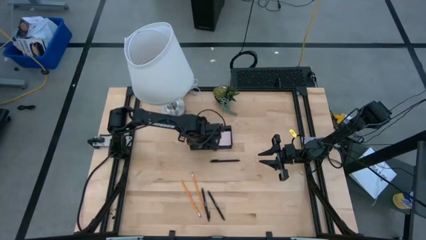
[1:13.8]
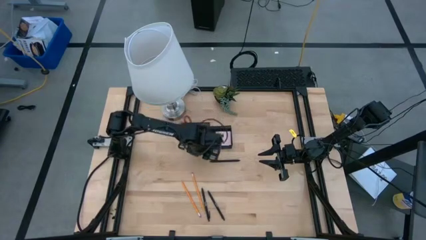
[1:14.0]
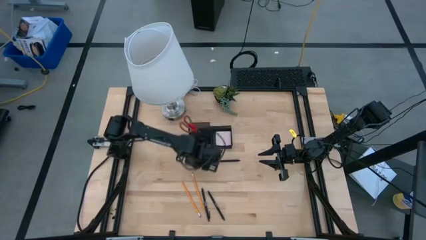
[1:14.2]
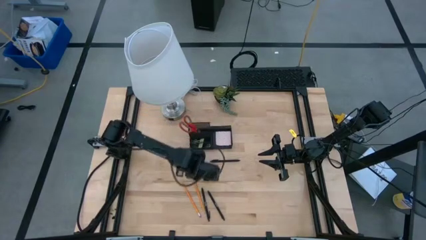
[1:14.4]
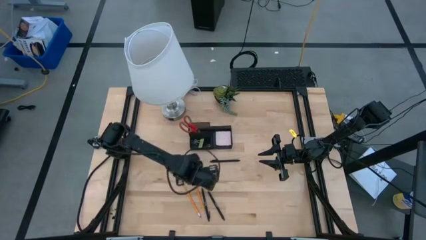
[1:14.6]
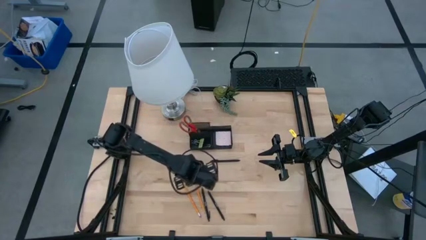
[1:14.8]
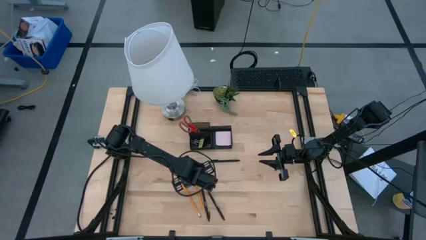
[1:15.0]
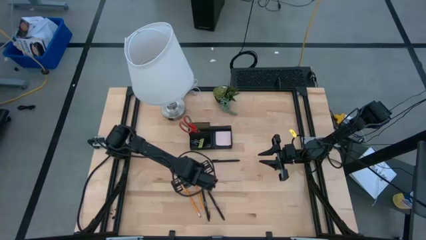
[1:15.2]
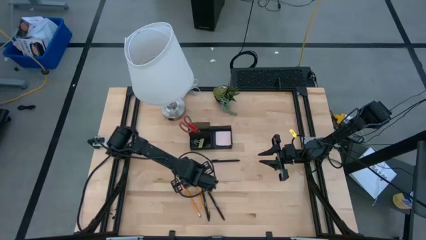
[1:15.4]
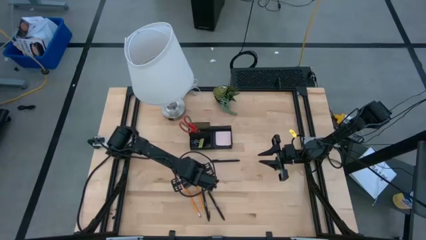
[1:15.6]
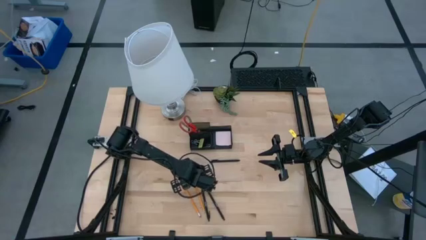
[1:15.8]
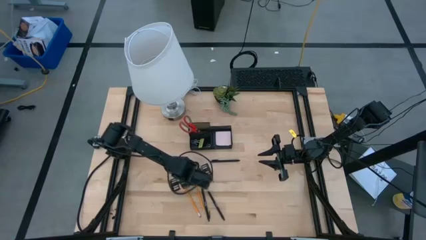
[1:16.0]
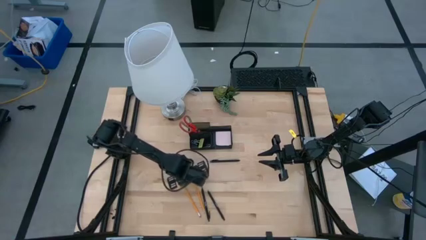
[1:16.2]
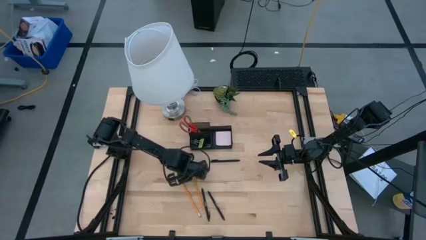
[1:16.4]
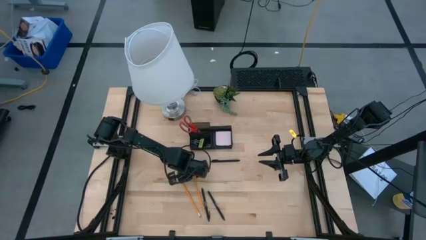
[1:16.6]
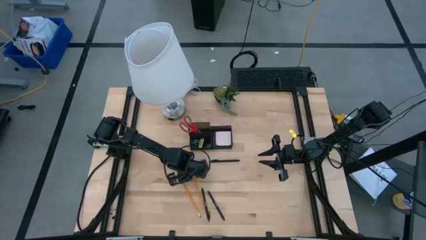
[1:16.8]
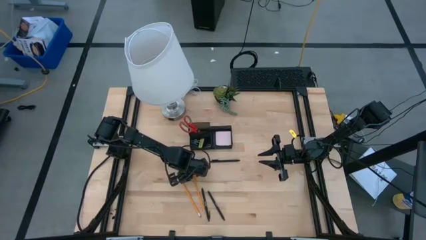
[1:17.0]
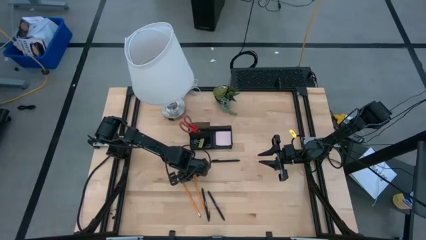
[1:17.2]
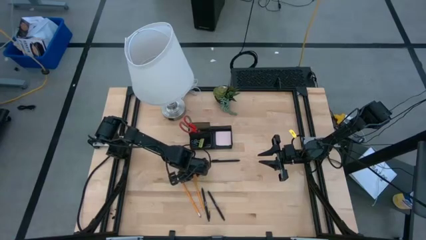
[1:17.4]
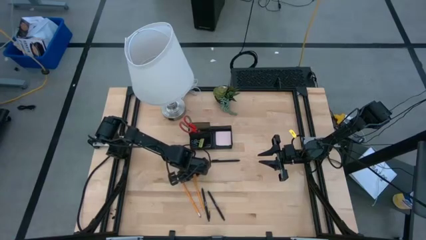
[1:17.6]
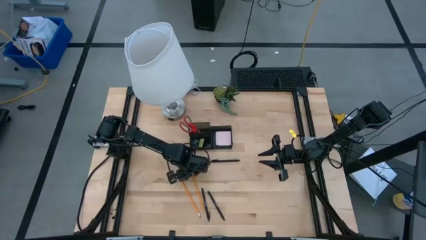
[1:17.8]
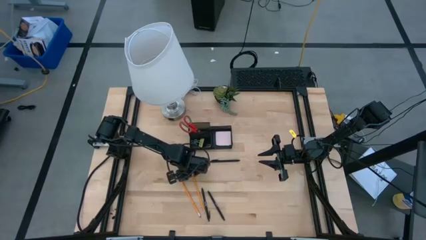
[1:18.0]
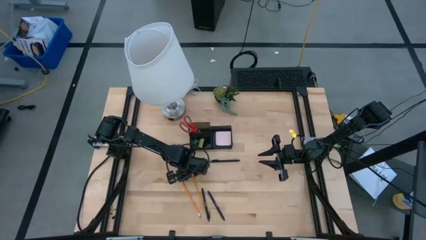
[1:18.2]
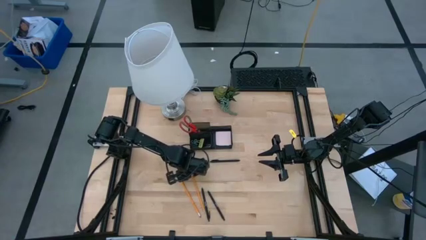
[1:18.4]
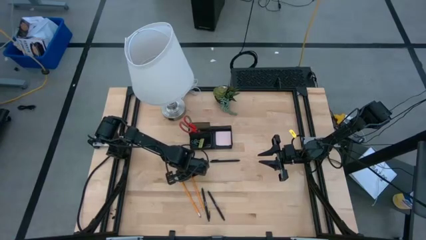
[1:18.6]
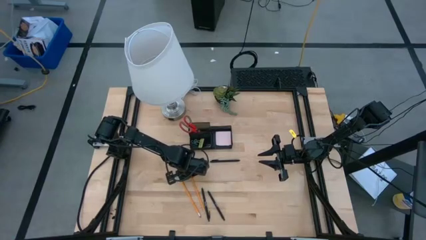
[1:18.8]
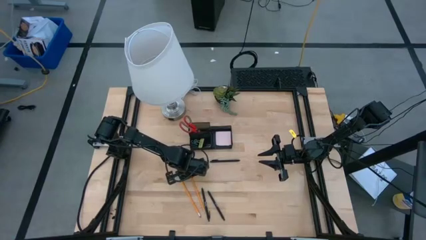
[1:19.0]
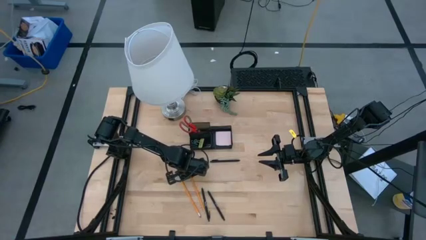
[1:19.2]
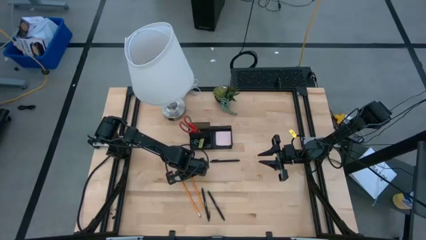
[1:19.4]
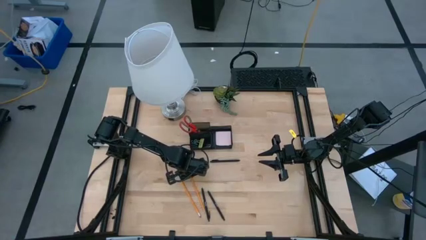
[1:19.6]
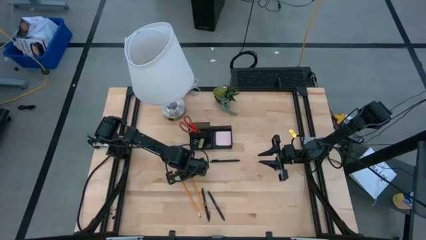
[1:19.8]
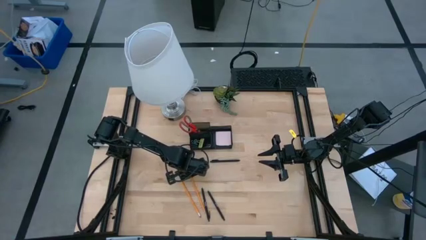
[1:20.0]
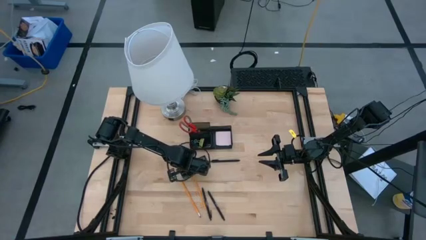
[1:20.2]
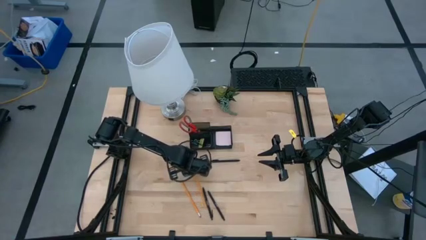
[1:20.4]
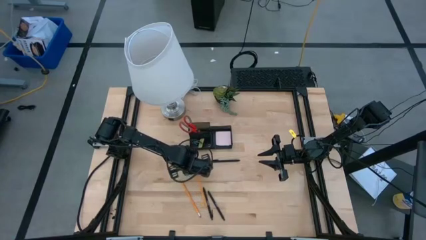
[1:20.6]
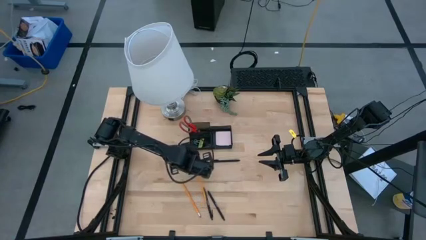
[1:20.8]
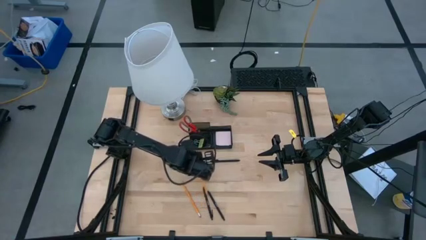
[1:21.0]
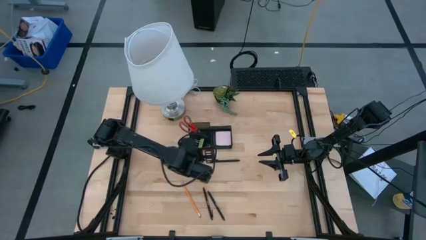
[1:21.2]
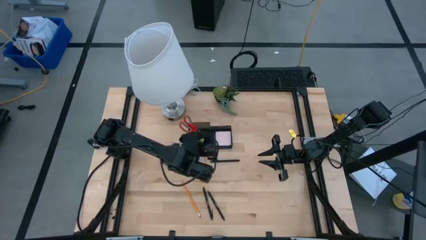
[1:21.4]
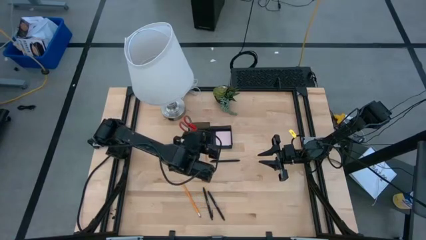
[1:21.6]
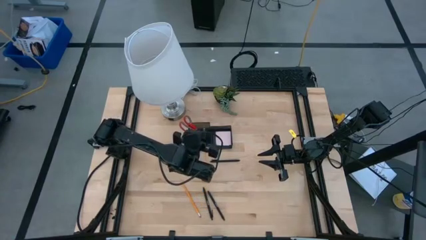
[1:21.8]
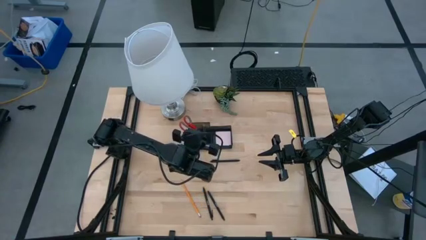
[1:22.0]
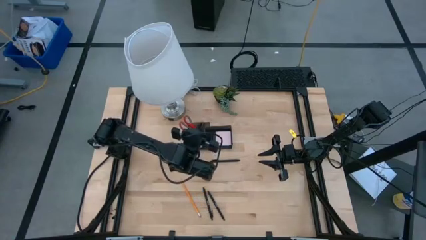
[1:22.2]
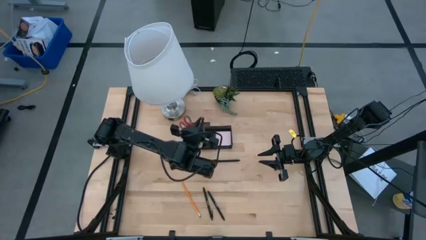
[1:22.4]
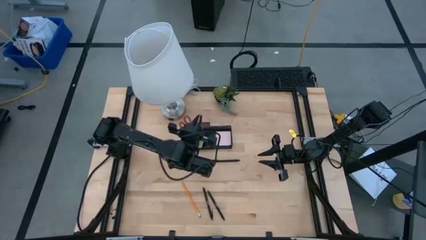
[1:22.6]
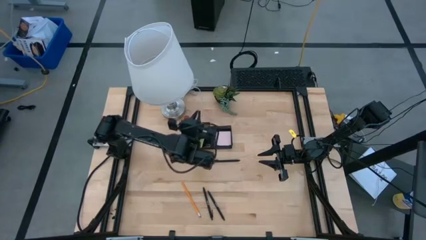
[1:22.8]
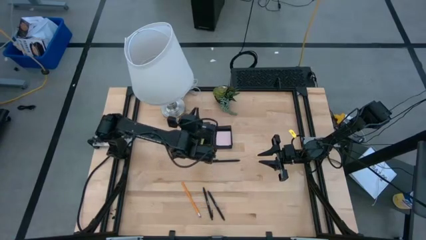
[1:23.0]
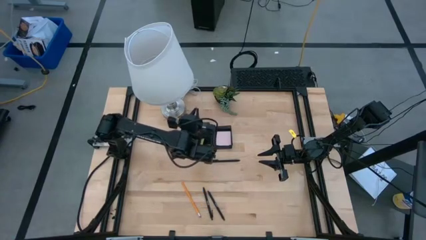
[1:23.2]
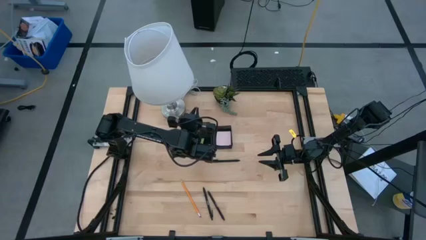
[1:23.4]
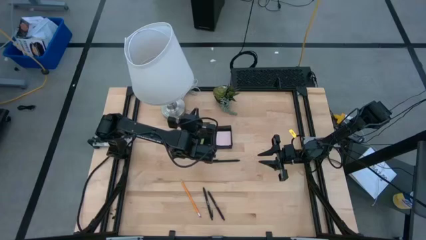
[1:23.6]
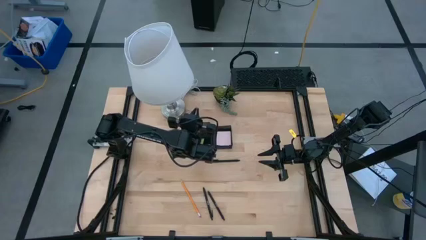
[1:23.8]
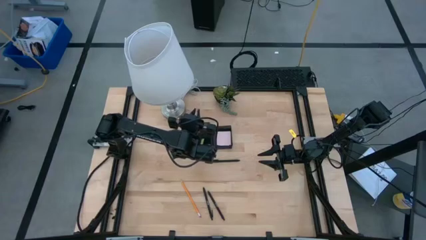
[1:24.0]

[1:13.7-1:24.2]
Task: Pick and place office supplies into organizer
Put the right pencil into the black desk organizer
